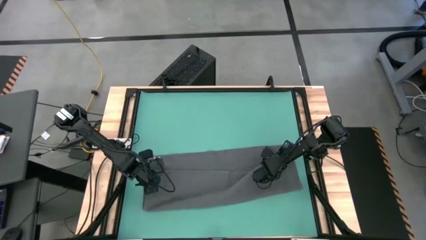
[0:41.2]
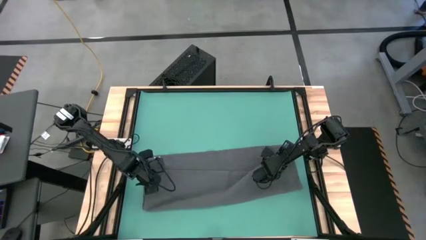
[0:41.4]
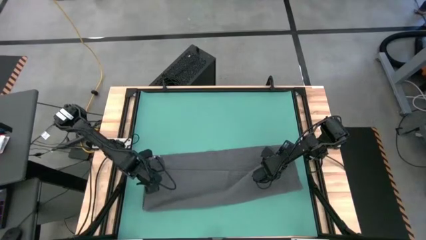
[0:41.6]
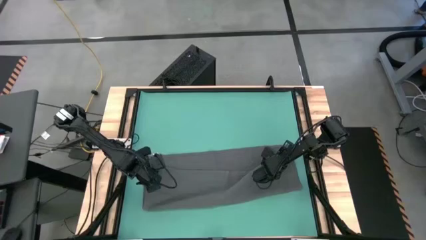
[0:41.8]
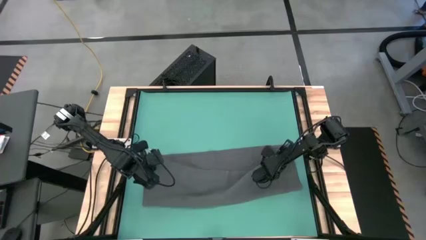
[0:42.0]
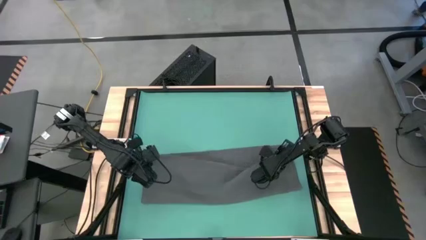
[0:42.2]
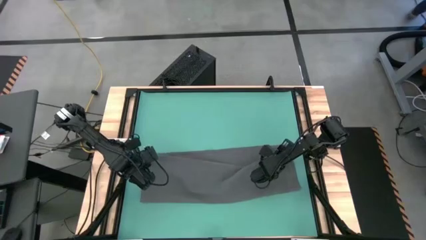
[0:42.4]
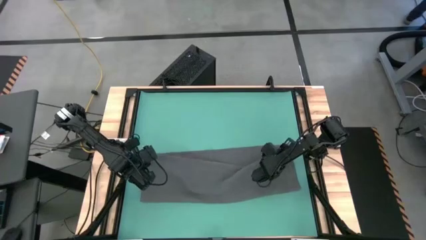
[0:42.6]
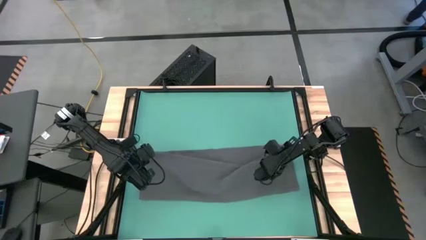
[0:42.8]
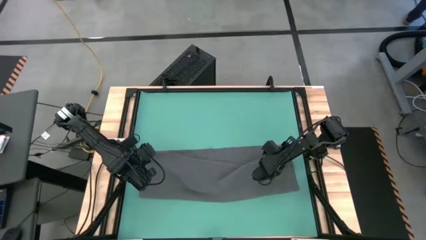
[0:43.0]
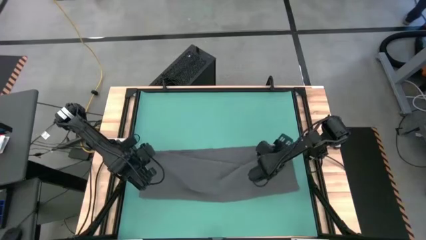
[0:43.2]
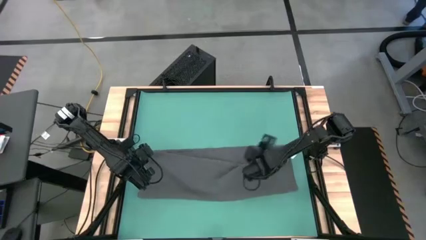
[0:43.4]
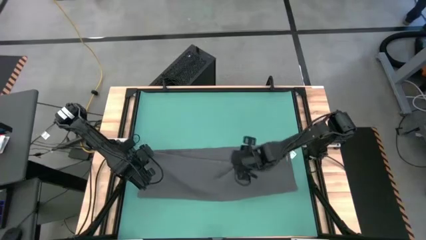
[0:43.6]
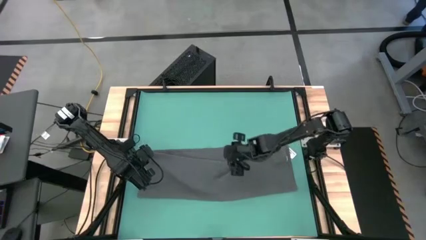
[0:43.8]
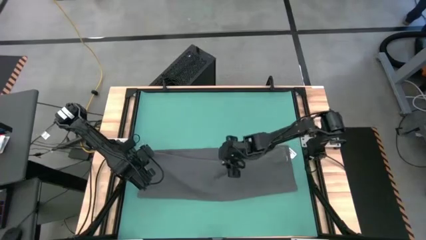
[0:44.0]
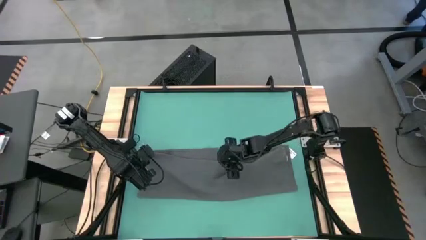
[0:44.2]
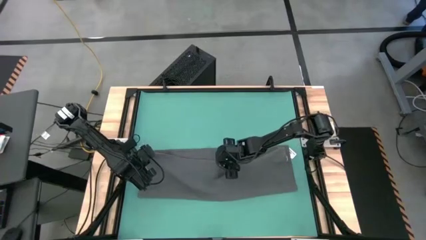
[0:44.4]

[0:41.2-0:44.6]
Task: Roll towel
Roll the gray towel

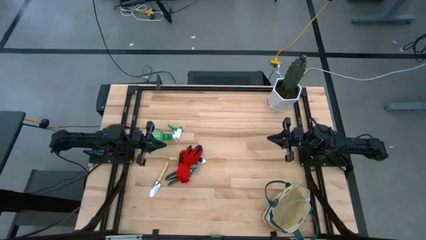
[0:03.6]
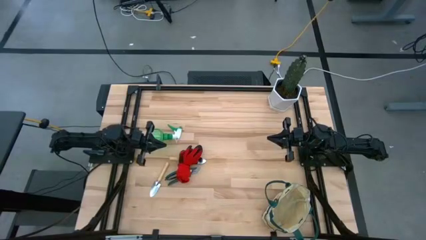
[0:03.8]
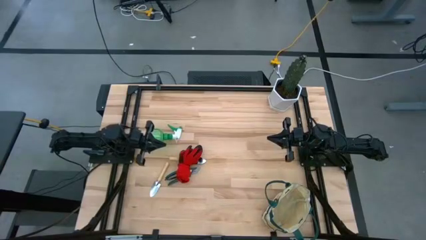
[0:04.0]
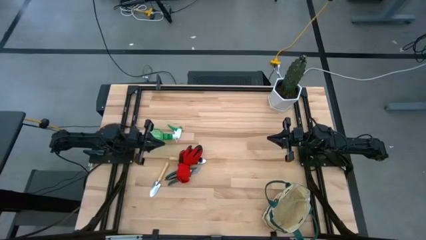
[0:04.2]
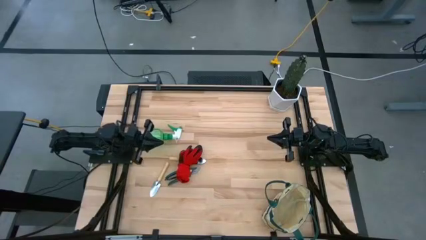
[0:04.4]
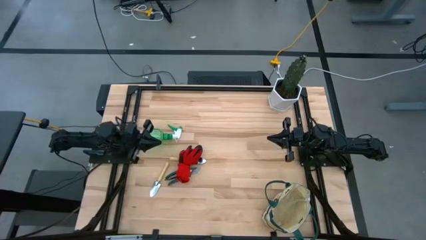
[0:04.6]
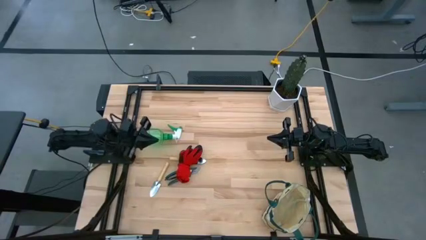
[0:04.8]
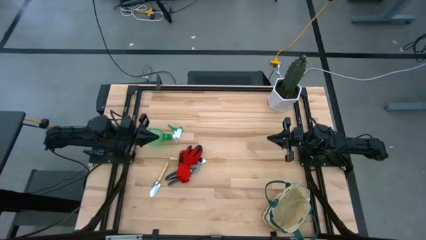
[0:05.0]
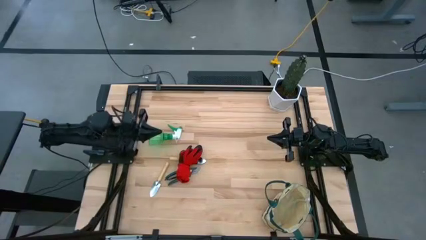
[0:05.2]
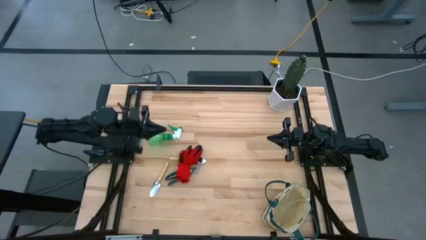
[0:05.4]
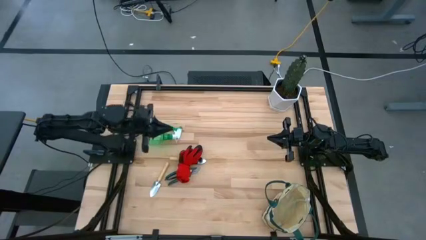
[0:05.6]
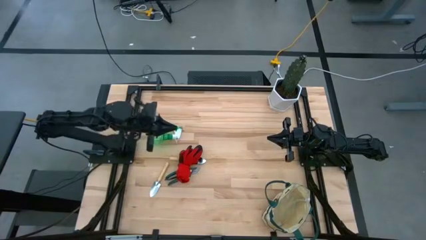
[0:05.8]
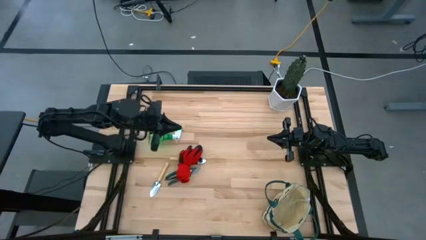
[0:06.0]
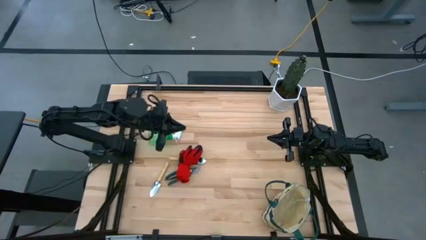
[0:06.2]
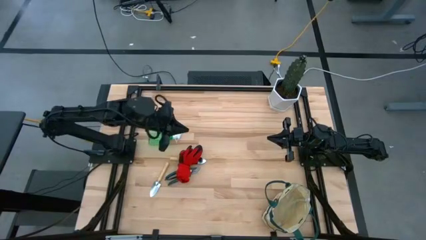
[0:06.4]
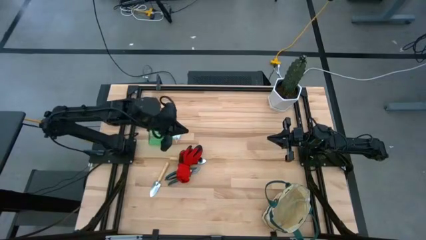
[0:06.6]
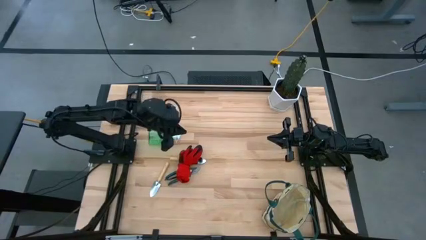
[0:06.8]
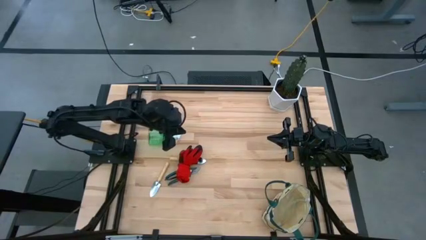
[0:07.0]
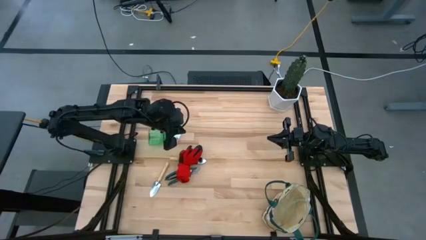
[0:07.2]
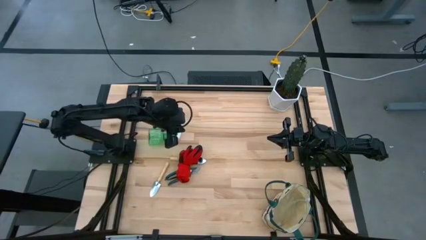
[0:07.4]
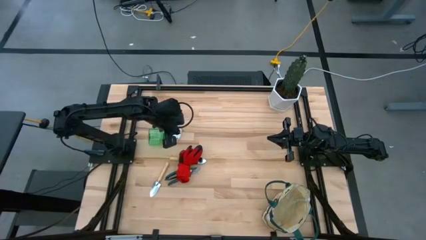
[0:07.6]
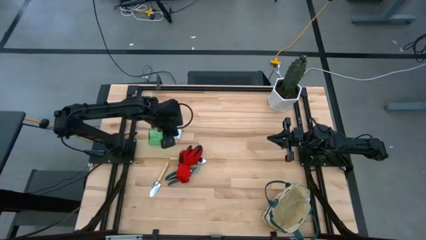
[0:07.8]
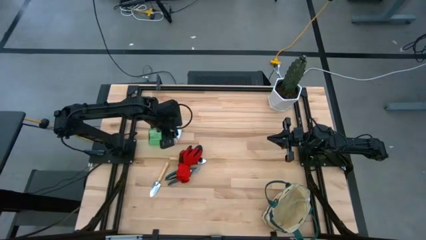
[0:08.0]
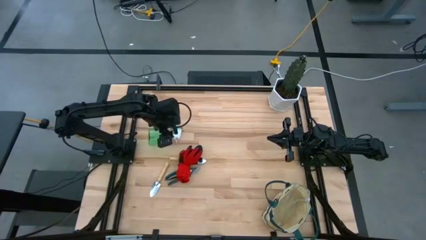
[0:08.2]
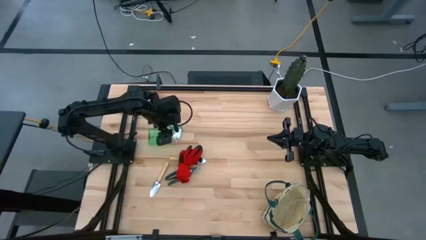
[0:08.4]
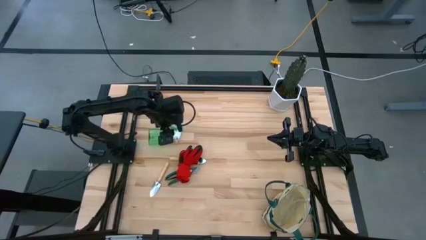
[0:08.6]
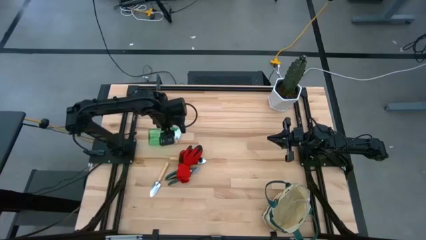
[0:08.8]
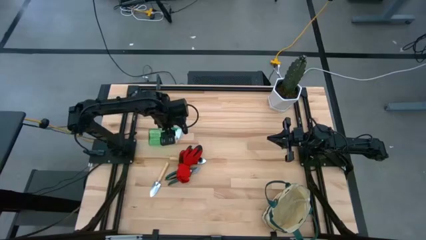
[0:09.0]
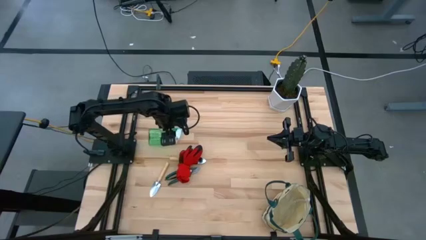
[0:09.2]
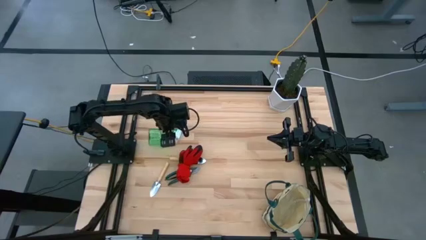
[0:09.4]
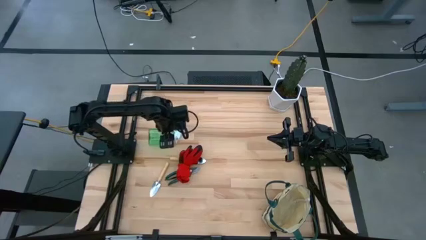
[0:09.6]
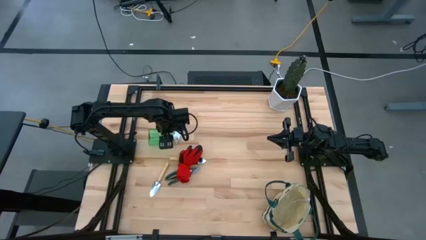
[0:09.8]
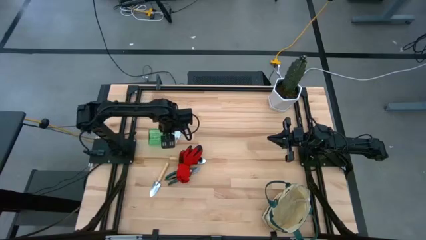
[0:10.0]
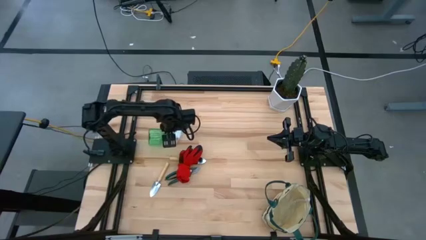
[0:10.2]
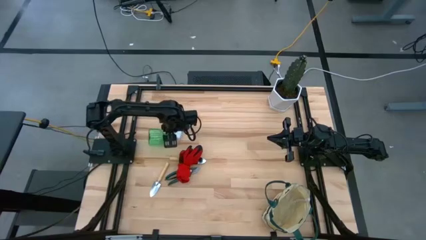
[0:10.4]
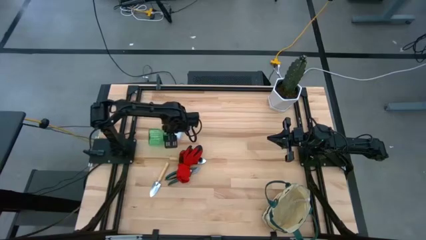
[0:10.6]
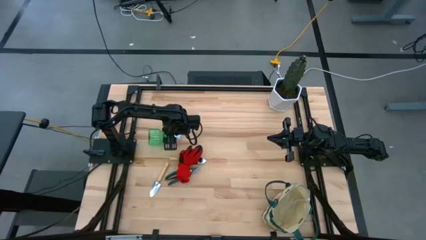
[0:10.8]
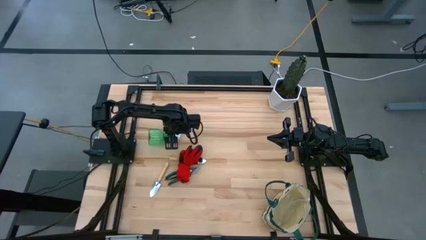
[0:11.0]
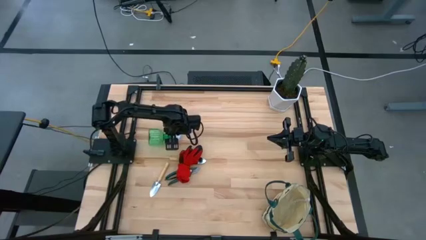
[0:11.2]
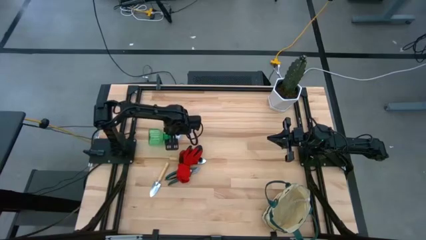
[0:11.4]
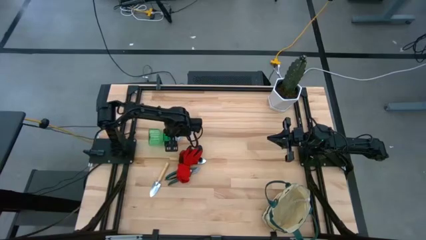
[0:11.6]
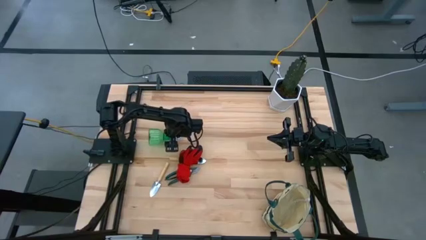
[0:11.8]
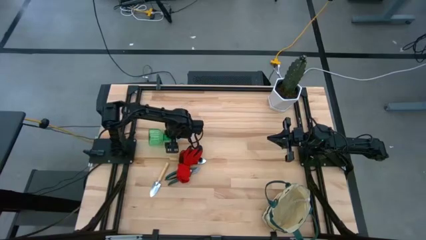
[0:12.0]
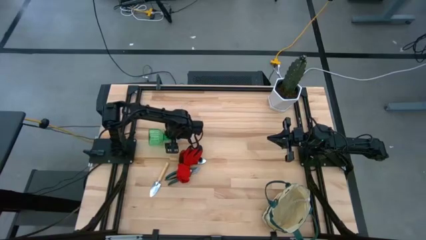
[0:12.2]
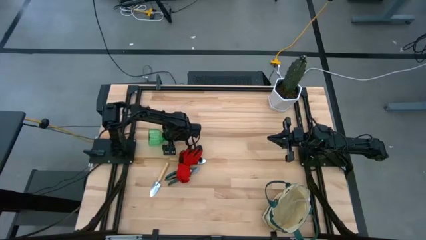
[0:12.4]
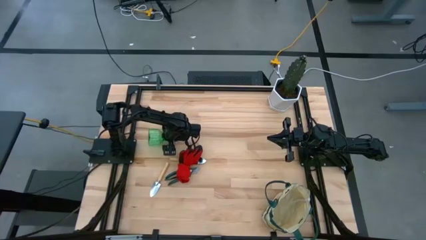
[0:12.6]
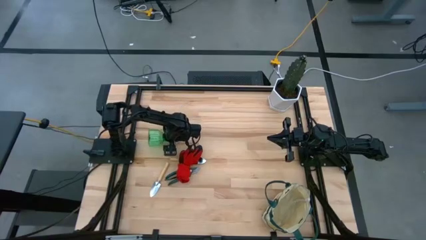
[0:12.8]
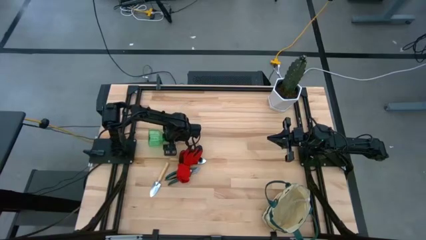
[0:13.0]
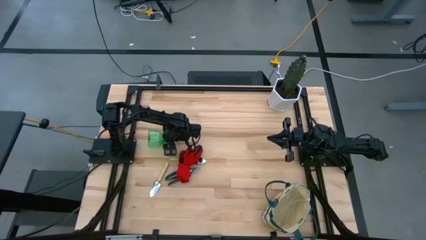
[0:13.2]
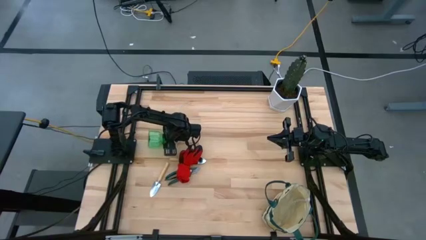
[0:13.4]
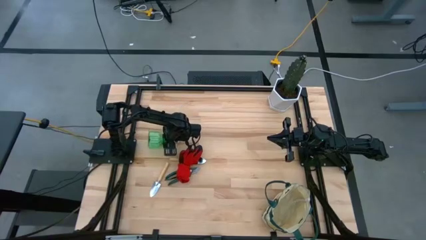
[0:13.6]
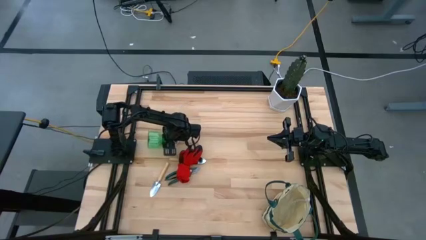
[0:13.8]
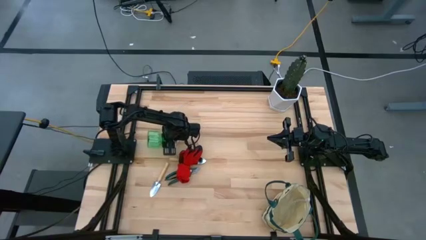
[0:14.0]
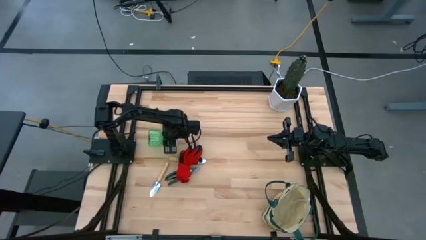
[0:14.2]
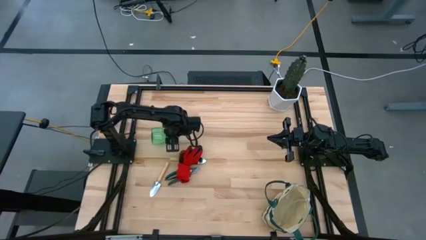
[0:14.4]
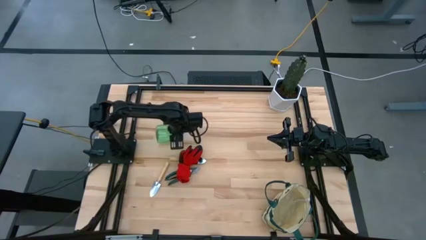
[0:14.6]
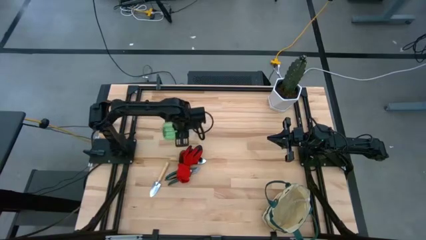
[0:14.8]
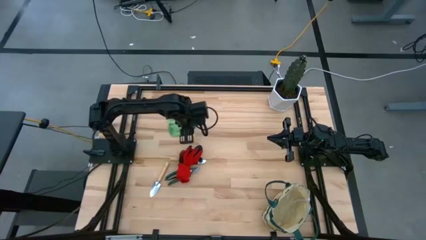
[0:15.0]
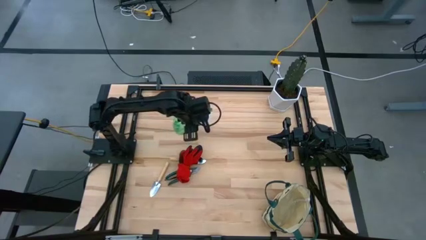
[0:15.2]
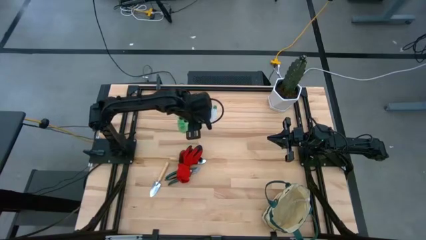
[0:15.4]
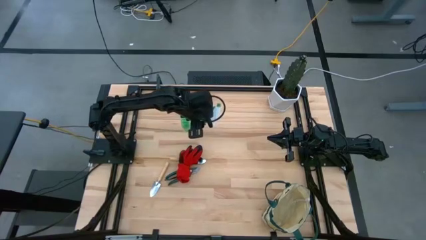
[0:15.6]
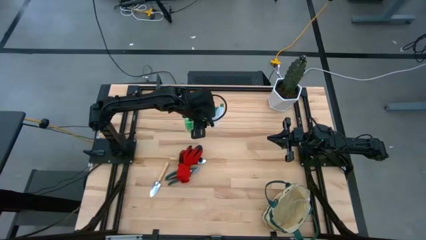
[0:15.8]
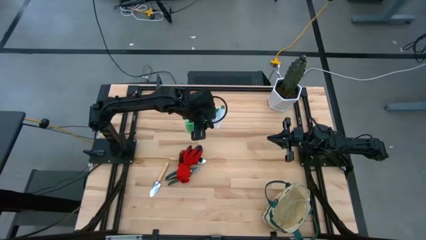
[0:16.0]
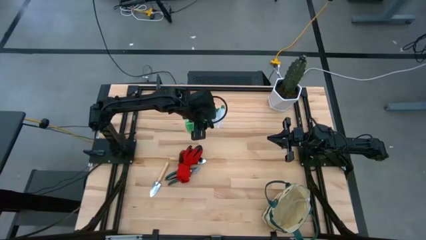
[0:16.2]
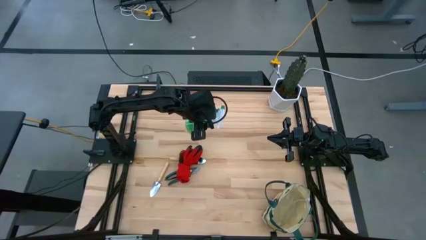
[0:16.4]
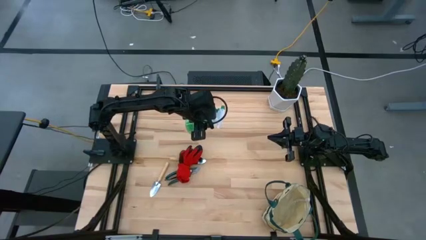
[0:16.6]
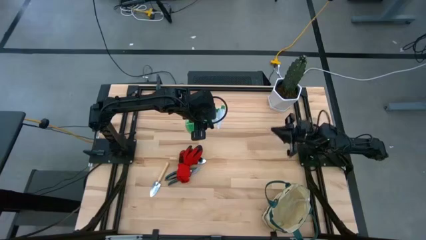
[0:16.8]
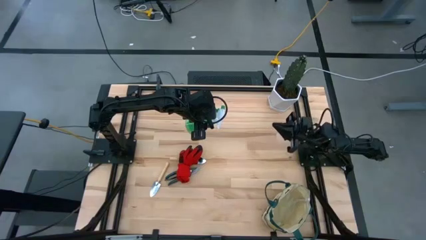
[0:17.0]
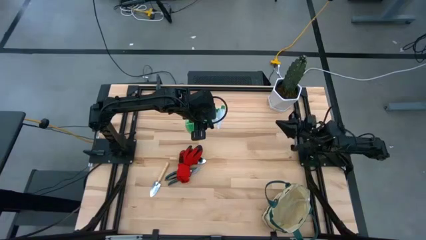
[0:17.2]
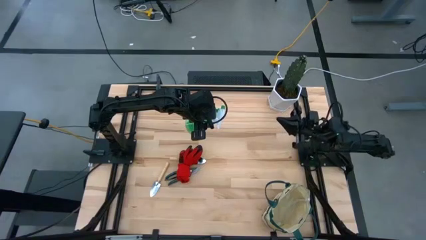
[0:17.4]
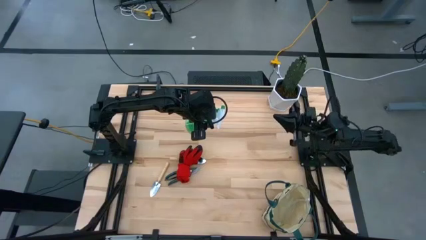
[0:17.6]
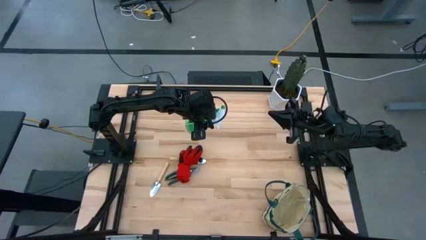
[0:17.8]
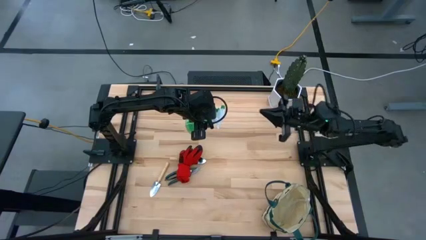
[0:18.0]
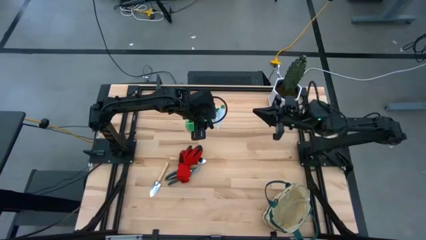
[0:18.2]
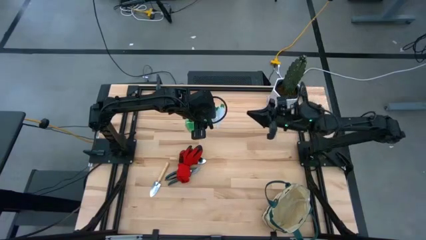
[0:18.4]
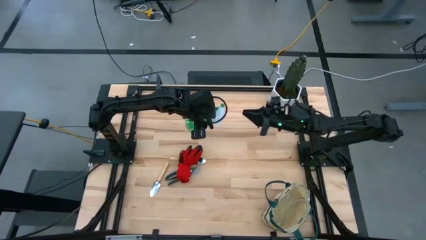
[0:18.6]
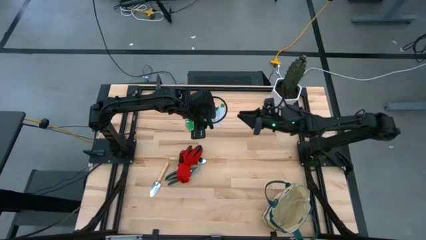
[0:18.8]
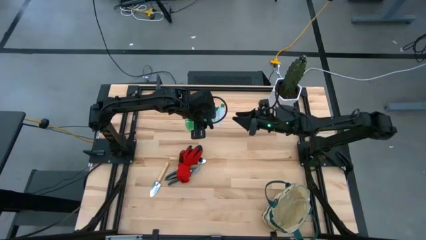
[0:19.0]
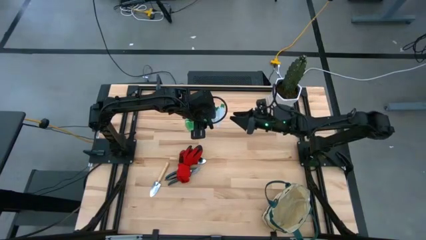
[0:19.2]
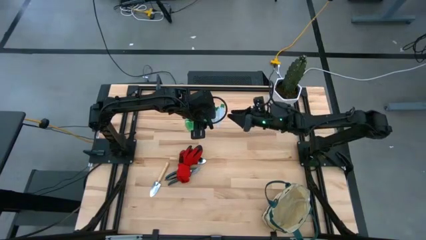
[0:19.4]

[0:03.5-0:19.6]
Task: Pick & Place Garden tools in Gardening bag
Put the green spray bottle into the gardening tool bag
